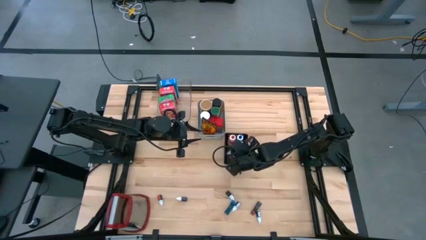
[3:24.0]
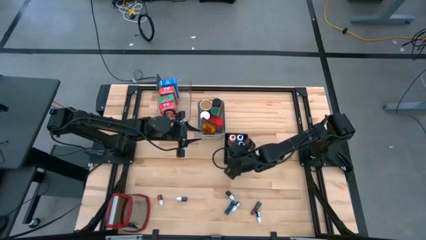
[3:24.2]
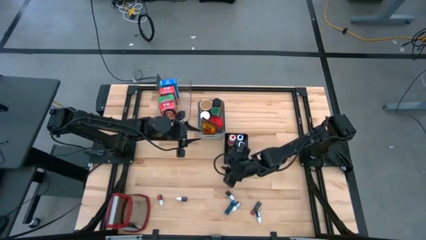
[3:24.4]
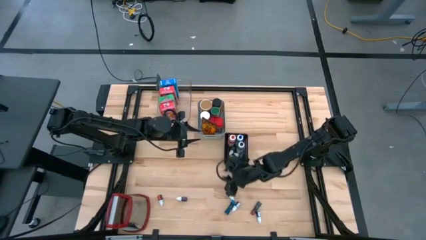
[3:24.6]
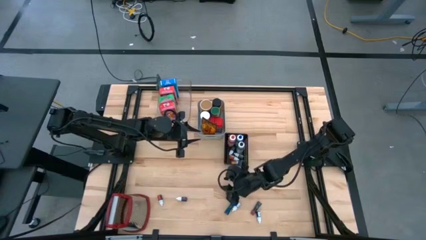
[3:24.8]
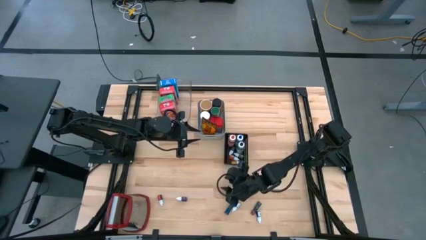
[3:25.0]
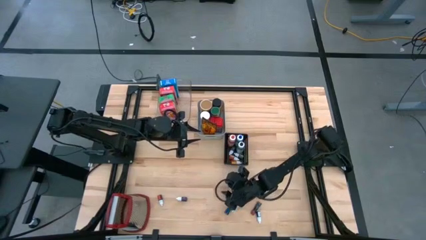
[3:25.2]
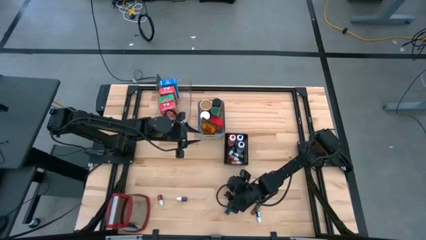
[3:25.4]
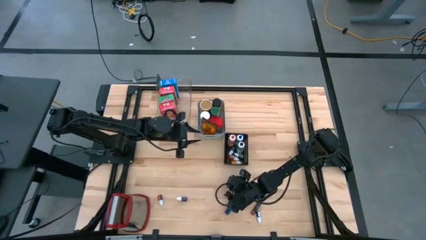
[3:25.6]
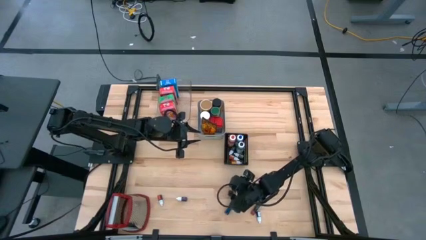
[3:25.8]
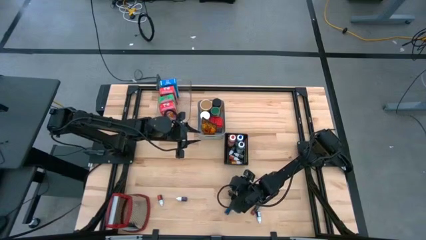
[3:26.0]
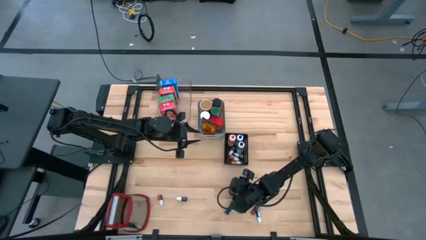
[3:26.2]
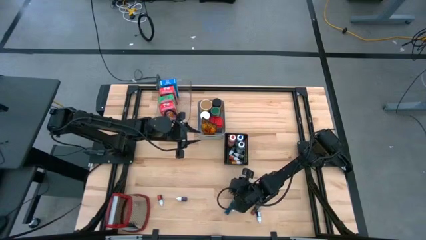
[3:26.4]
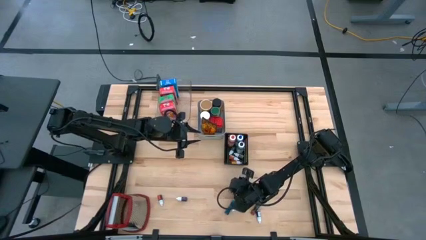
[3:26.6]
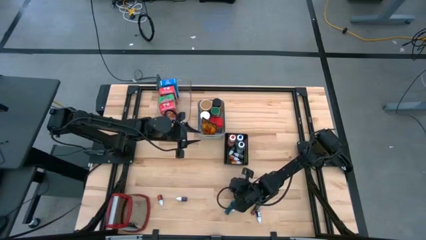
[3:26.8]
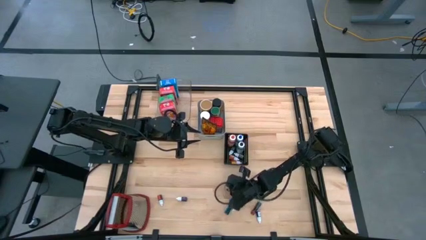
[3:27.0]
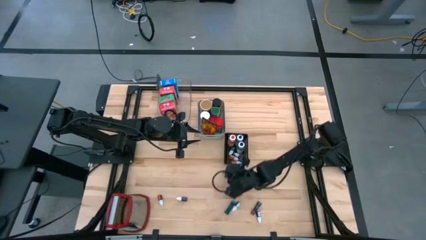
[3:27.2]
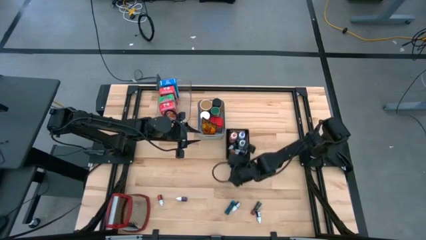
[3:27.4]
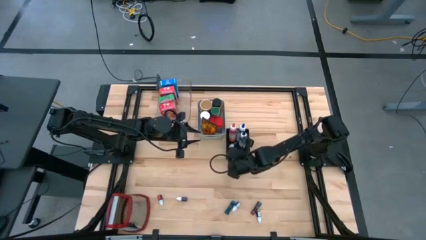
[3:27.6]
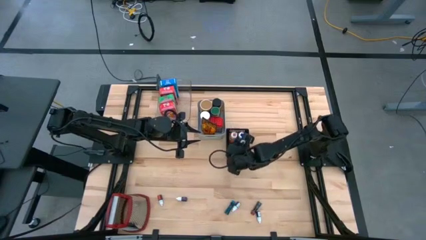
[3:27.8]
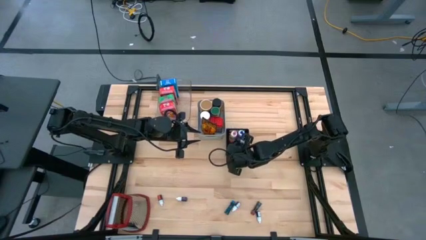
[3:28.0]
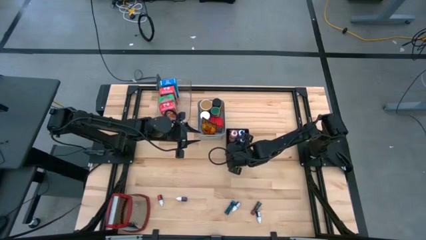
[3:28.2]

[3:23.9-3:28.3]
Task: Pick & Place Kitchen Items
Put the green food coloring bottle into the black bin

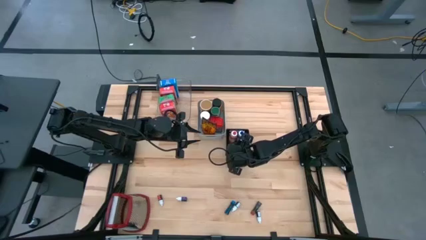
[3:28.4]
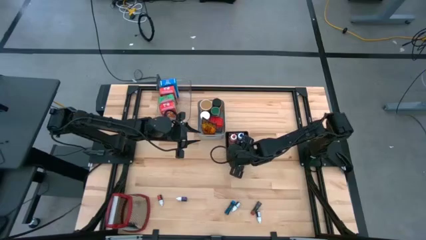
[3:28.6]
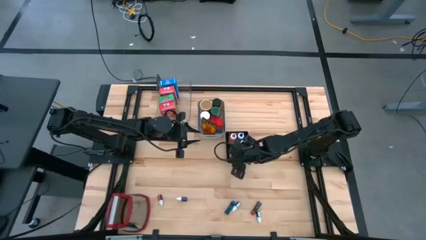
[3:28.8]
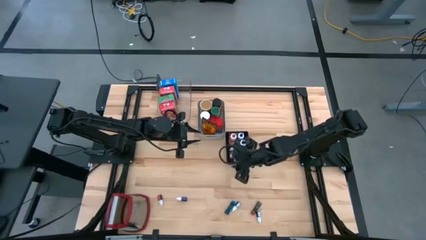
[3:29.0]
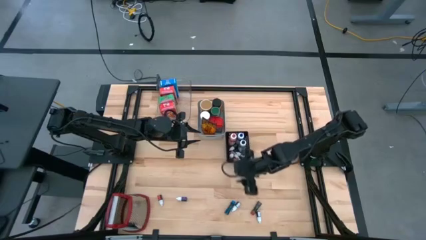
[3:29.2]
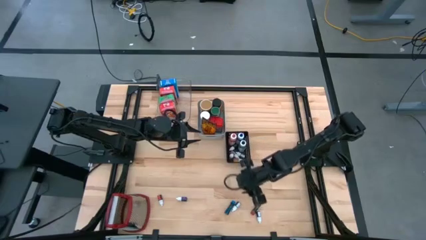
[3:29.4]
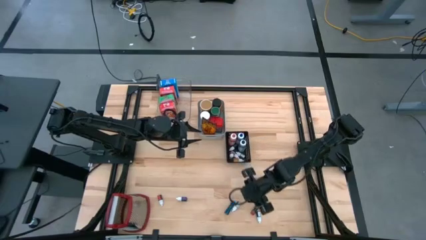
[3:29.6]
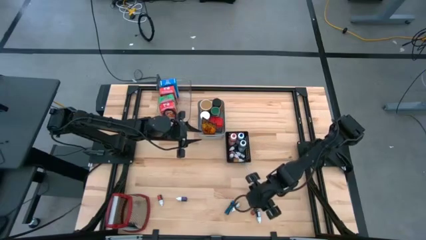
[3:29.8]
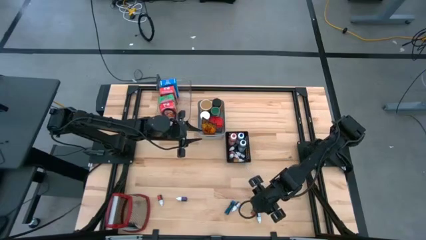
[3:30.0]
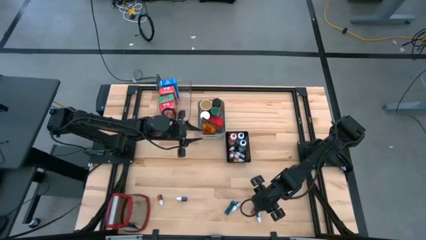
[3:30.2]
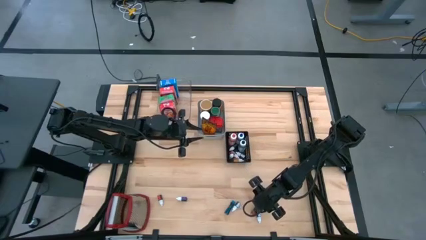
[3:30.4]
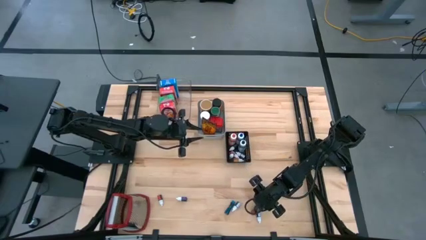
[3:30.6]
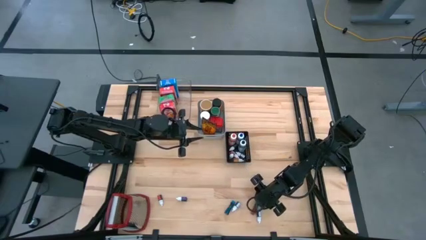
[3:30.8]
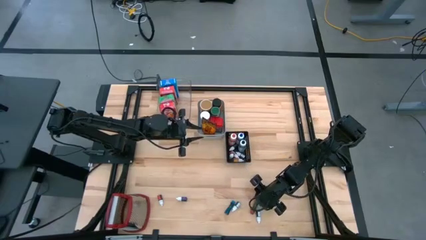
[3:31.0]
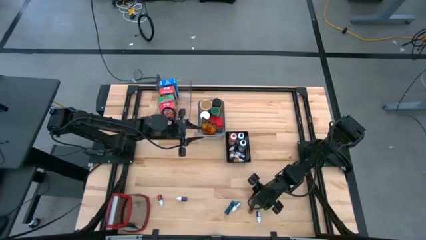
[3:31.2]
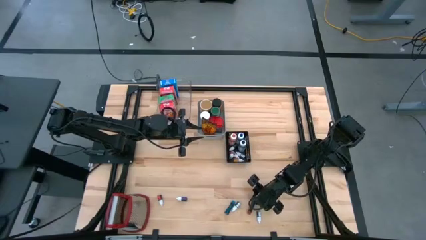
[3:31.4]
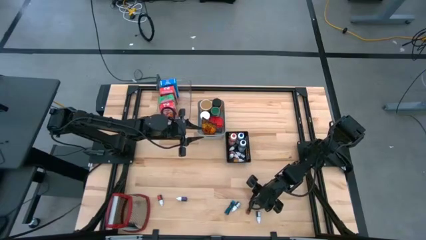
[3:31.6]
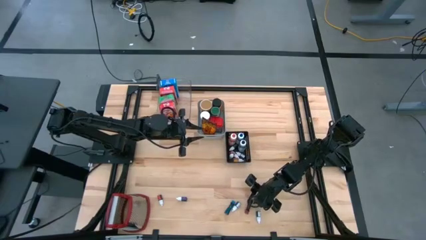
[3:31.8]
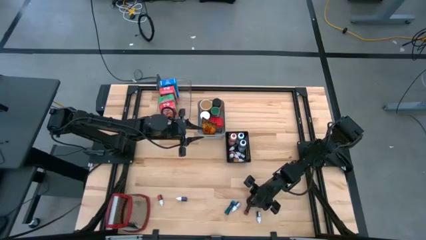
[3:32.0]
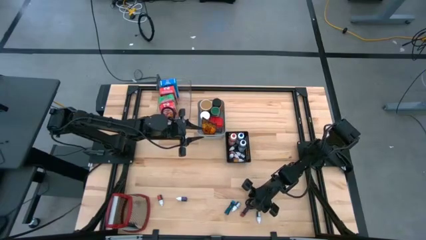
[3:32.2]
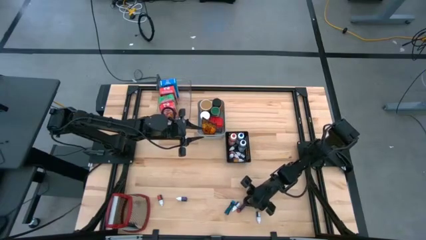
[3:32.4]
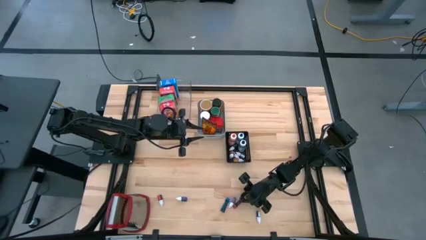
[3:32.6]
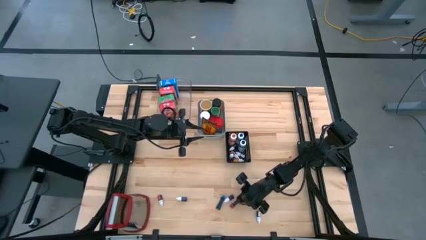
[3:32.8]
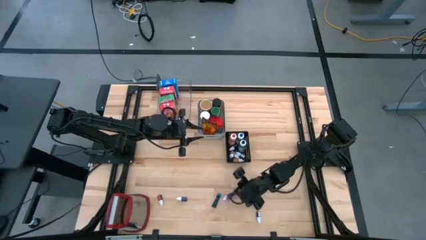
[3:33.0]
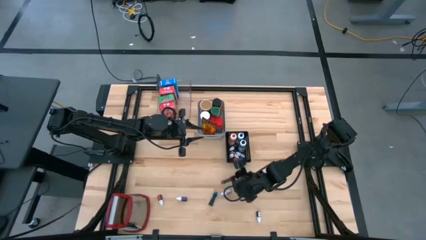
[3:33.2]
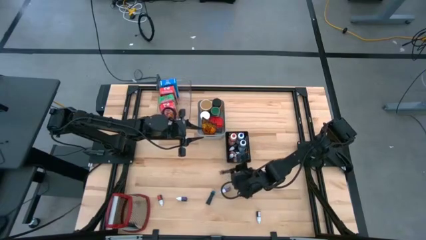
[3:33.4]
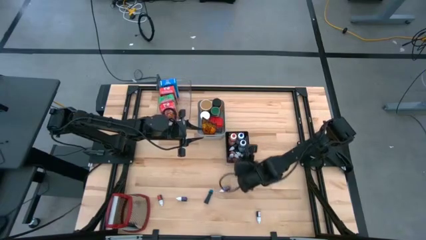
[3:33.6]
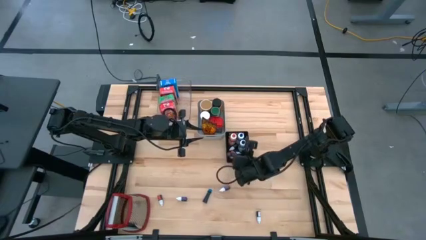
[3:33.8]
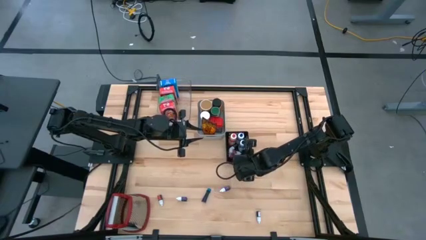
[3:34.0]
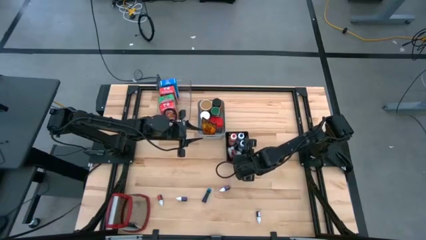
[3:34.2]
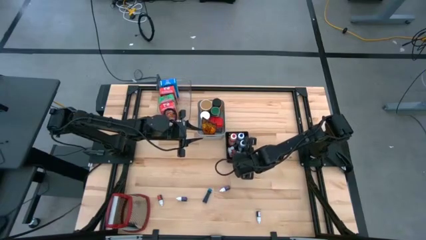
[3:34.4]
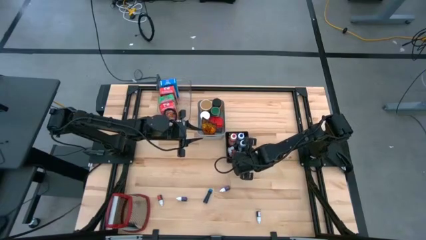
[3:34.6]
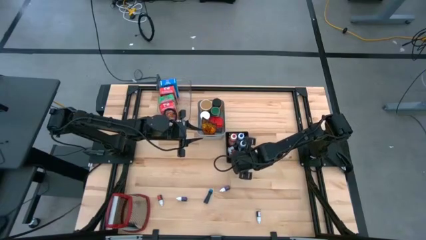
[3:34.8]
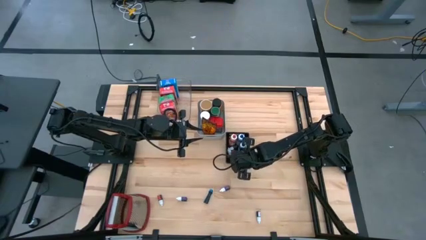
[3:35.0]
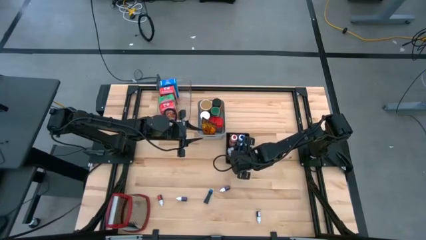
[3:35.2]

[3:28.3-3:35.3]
Put the red food coloring bottle into the black bin

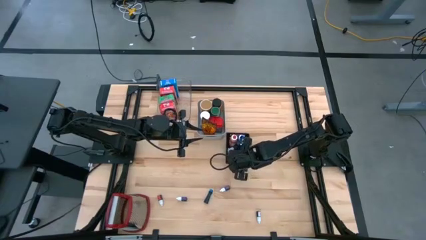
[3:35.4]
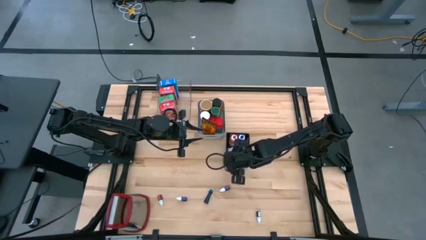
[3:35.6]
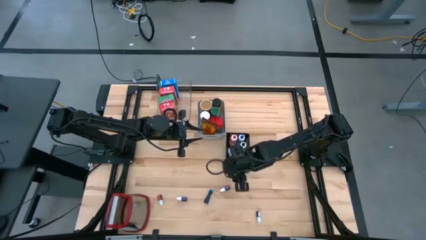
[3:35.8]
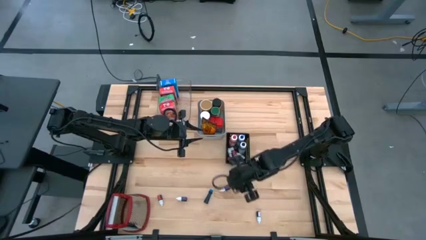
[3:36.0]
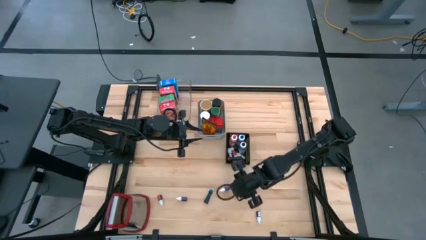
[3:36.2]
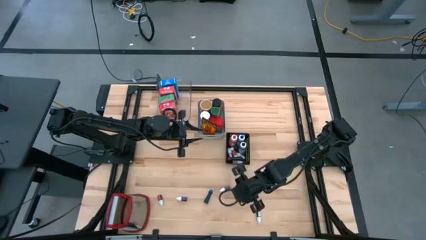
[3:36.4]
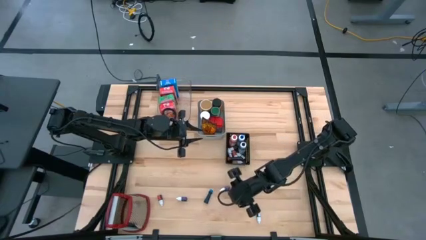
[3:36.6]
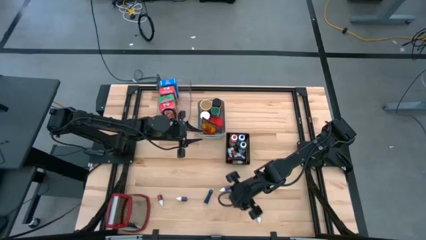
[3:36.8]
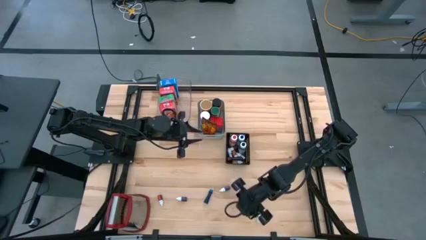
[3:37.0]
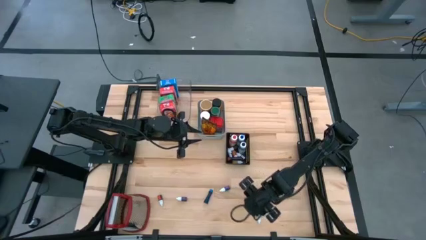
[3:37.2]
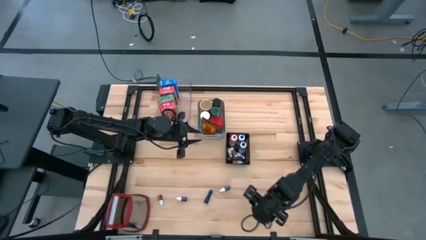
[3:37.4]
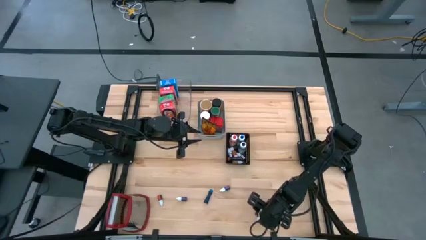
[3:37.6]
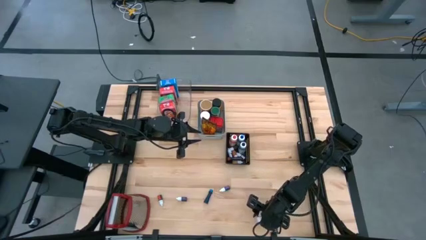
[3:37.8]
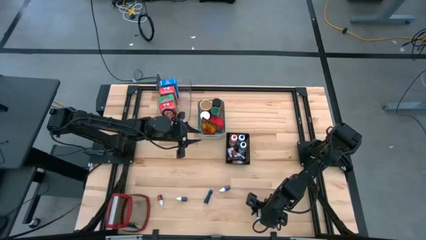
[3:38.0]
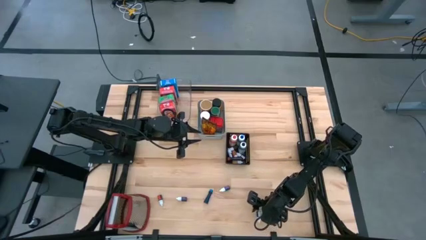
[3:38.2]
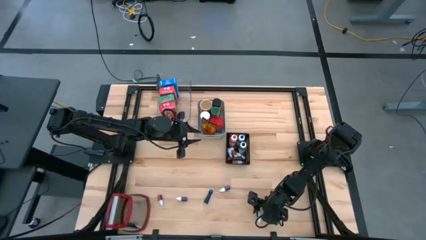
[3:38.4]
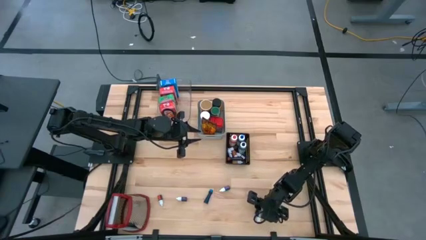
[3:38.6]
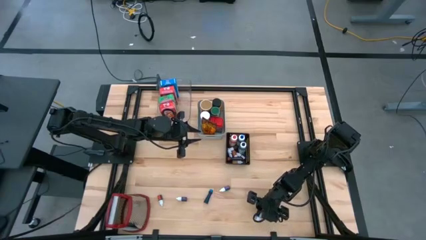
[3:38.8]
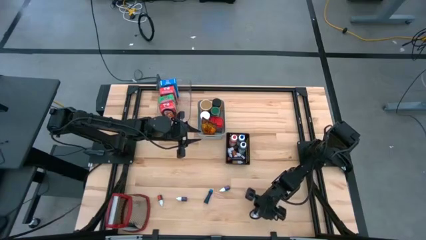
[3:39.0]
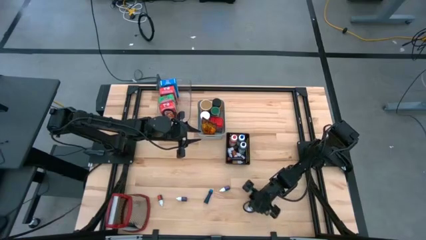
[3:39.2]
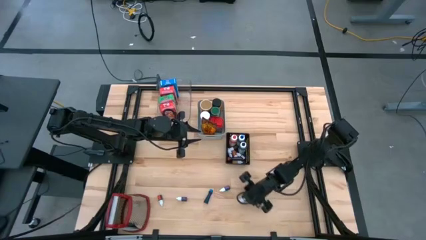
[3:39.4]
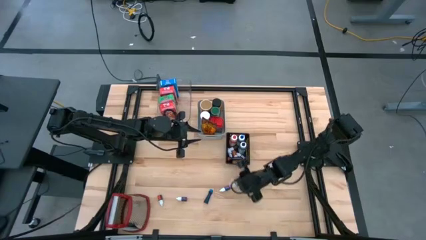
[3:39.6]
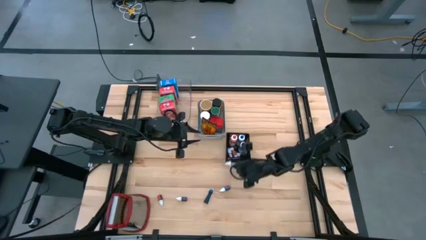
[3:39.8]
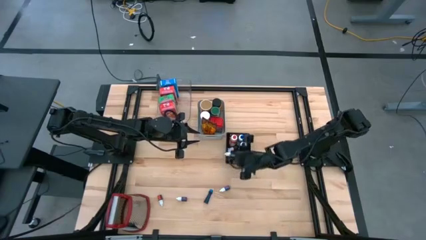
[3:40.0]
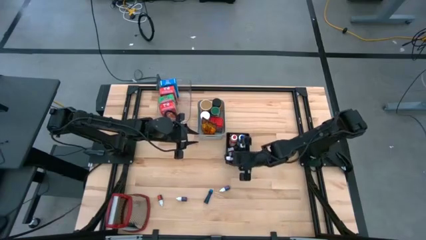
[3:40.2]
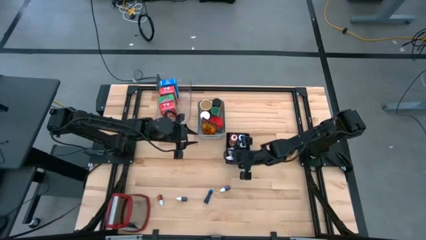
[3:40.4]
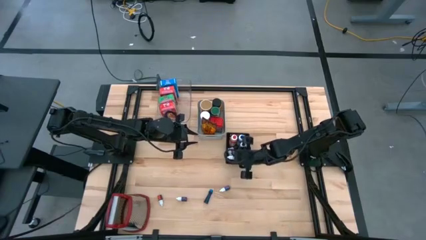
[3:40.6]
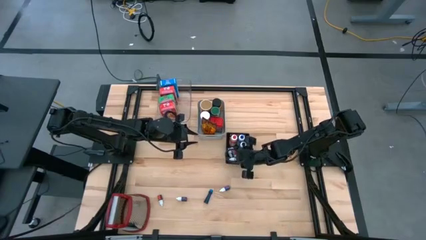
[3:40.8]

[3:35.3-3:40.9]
Put the black food coloring bottle into the black bin
